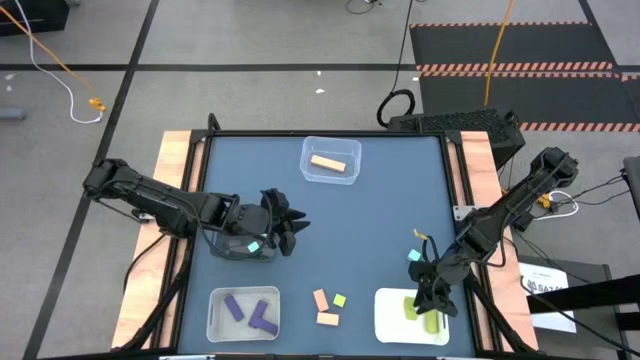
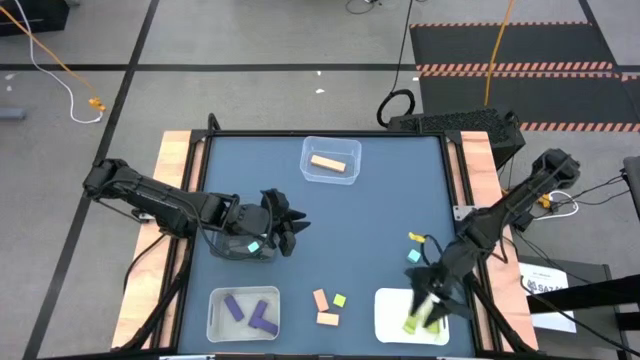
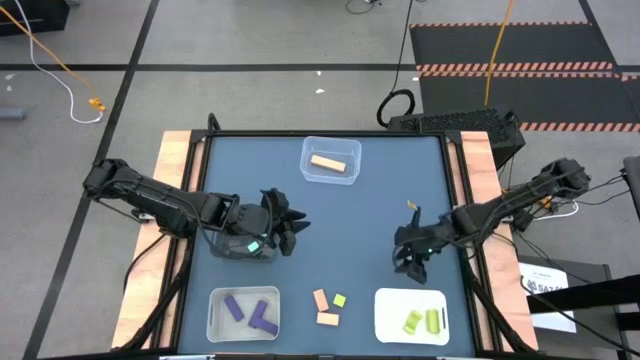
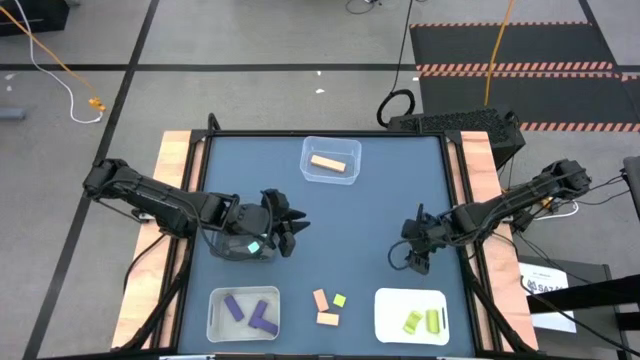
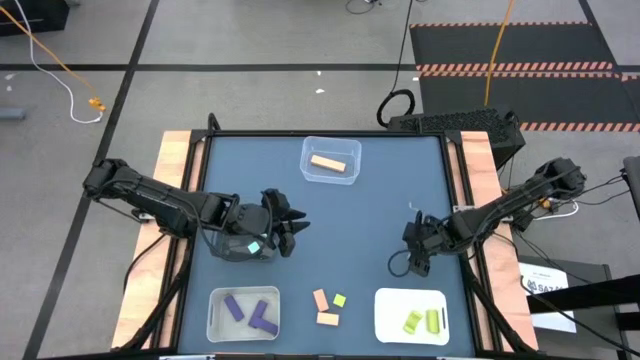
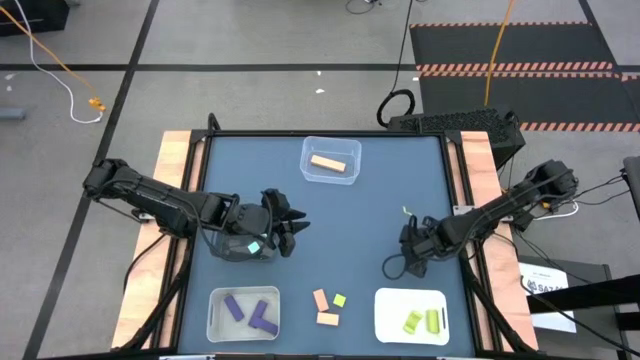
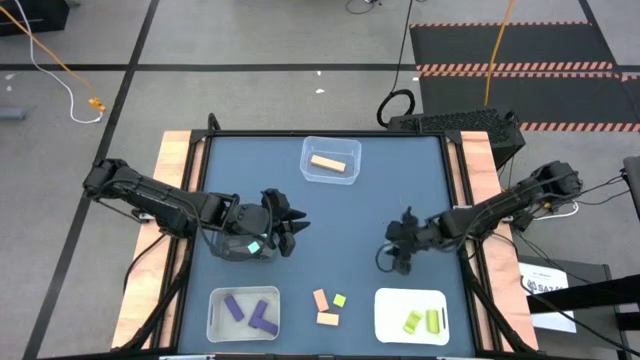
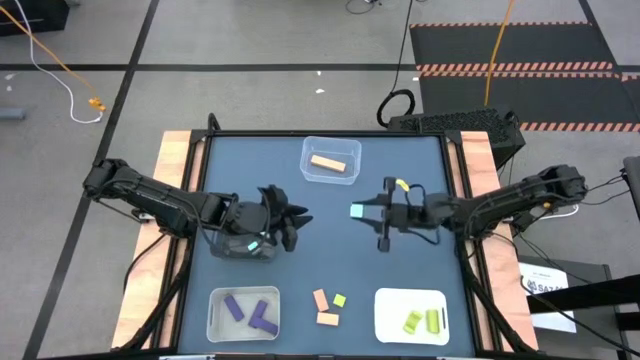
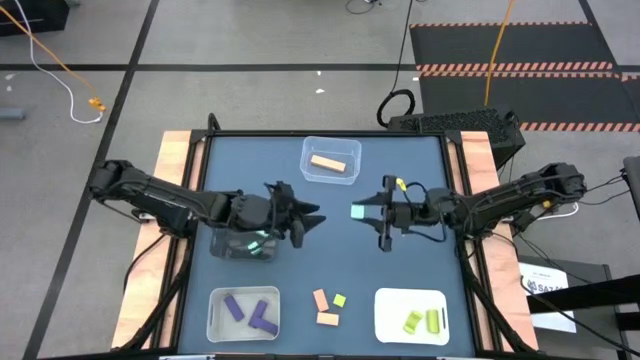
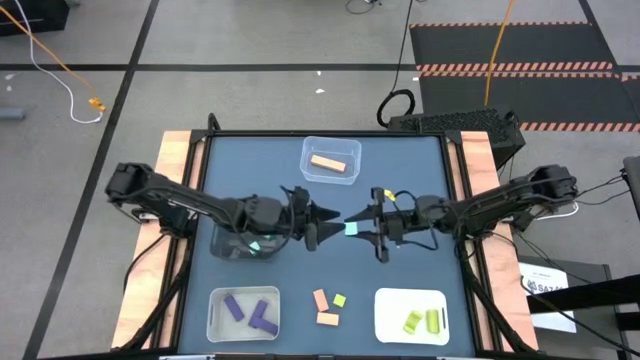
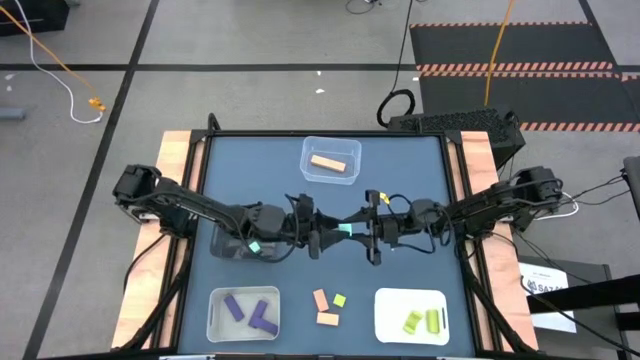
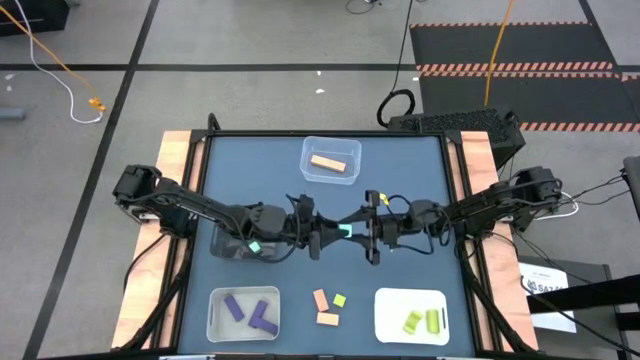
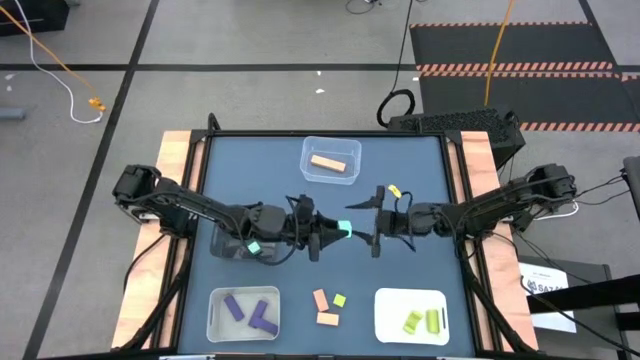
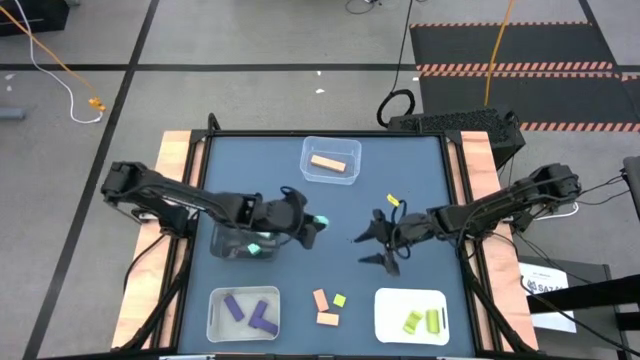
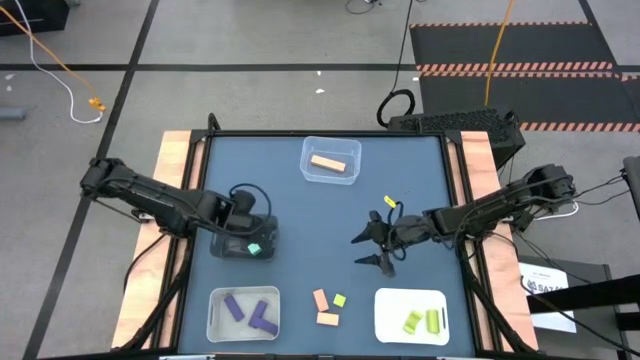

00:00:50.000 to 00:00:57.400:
Task: Sort & place blocks by color
Put the blue blocks into the black bin

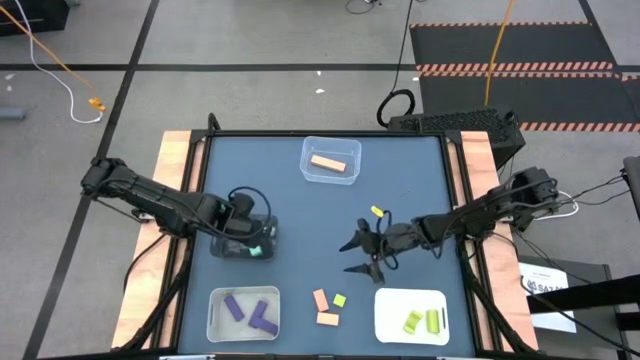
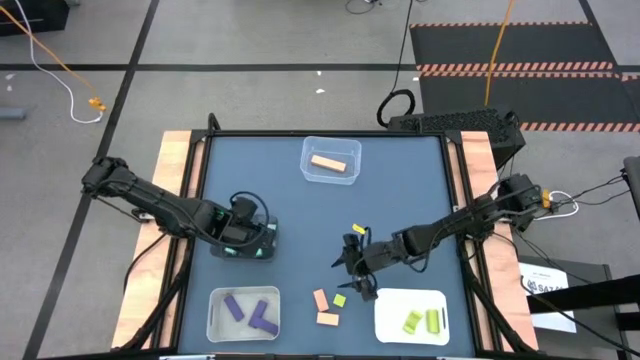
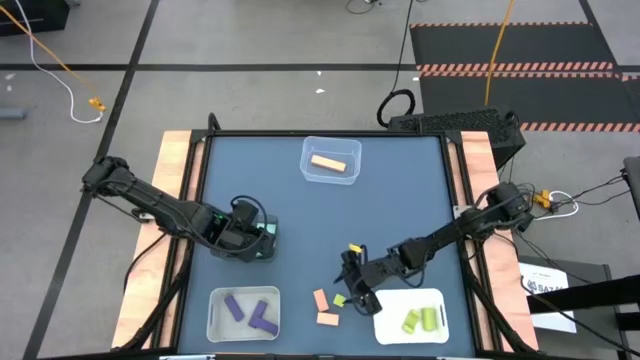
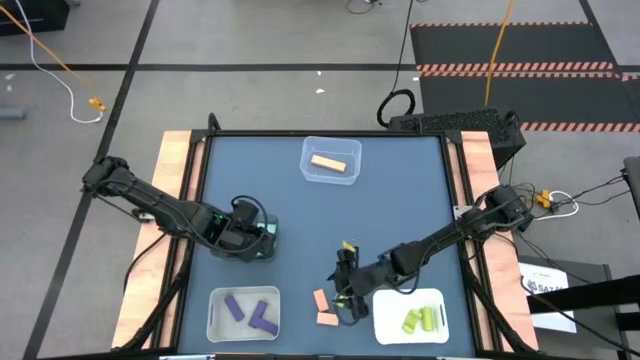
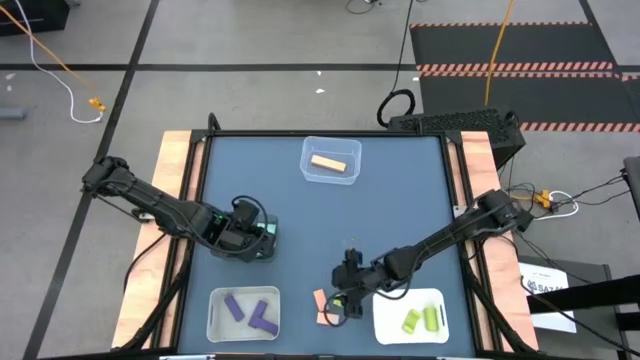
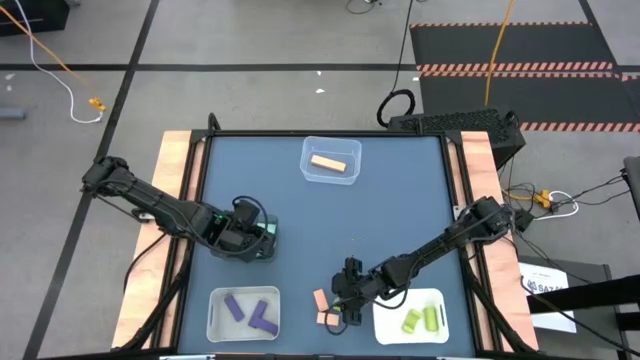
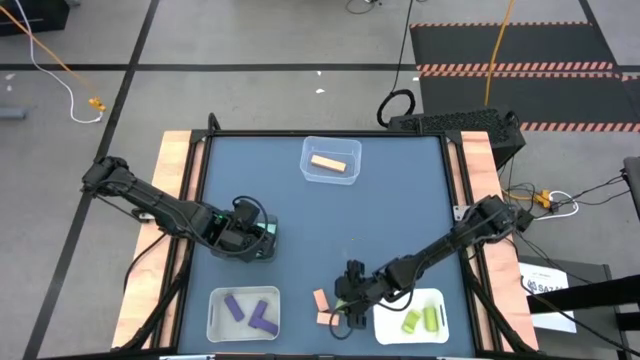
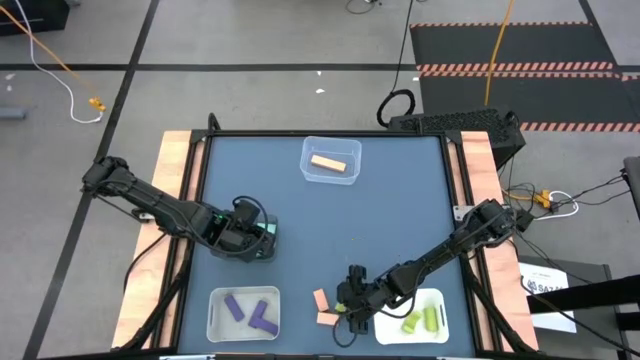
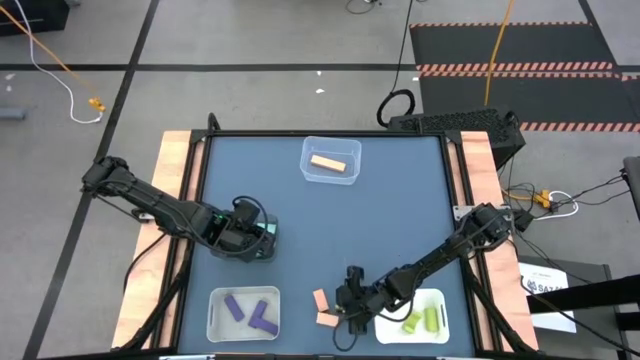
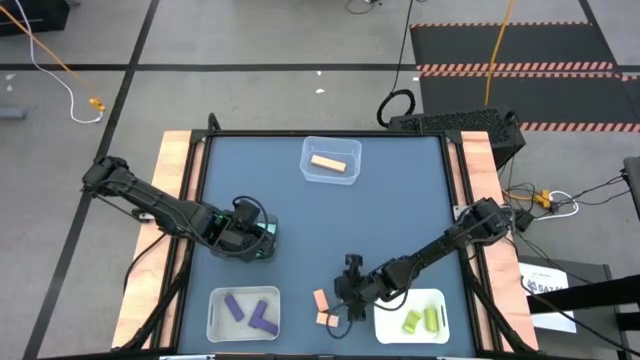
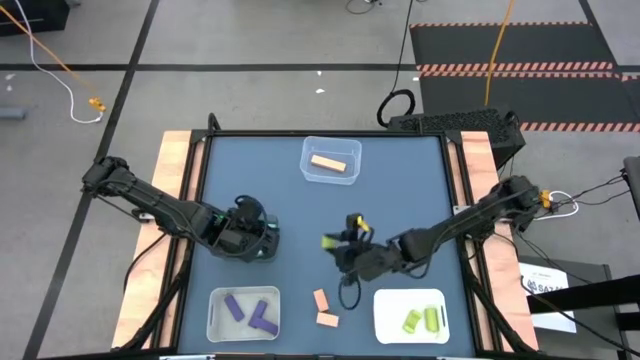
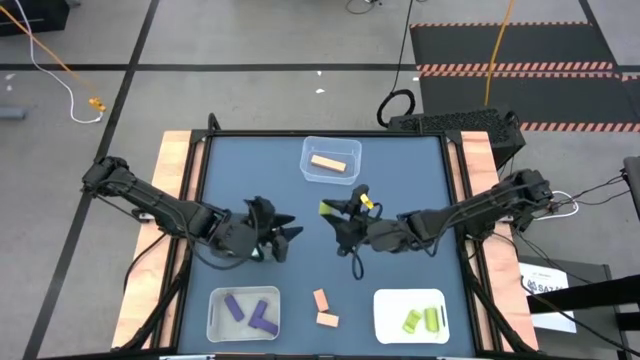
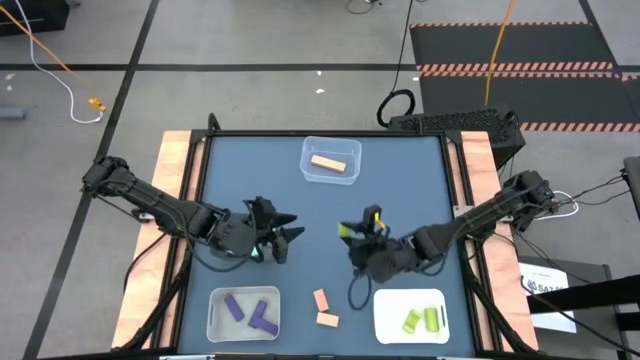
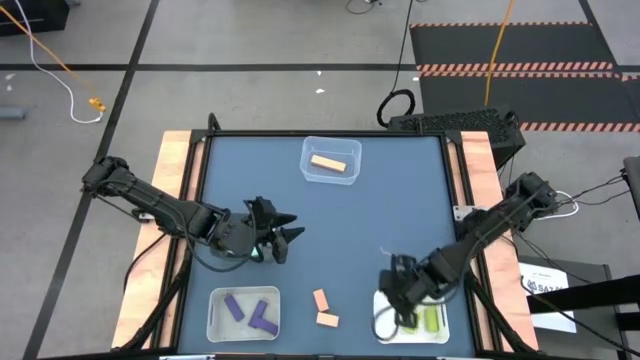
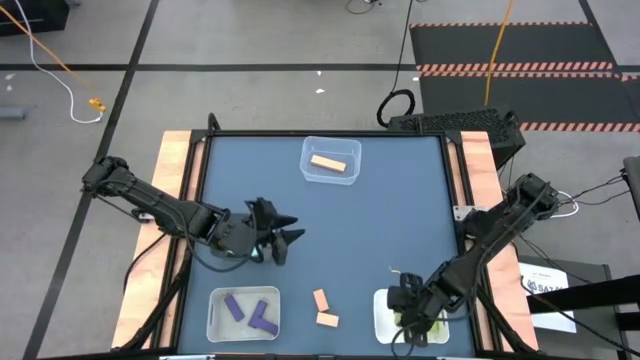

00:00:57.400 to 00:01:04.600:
Put the green blocks into the white bin

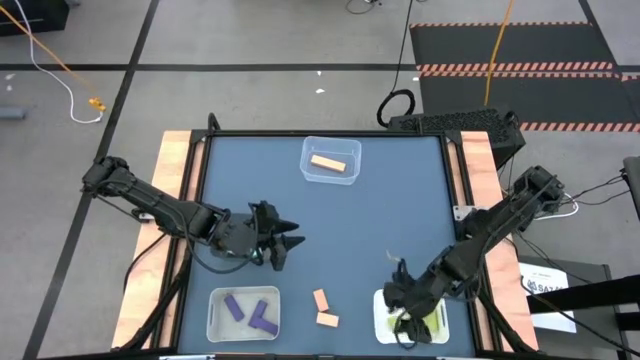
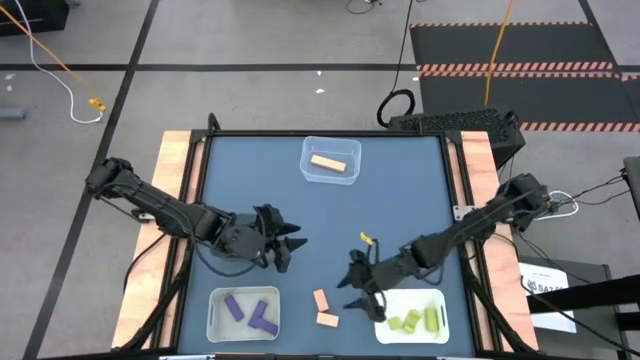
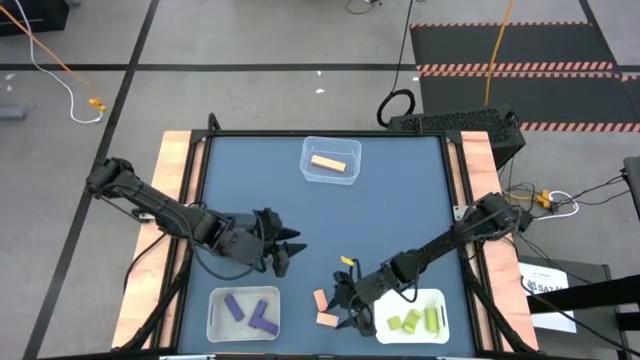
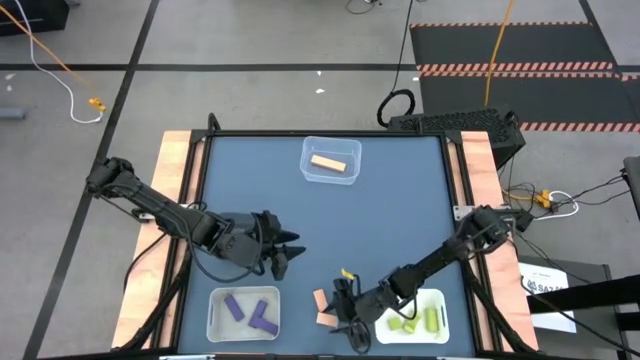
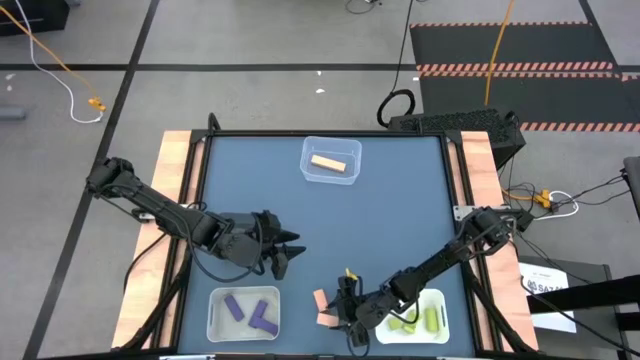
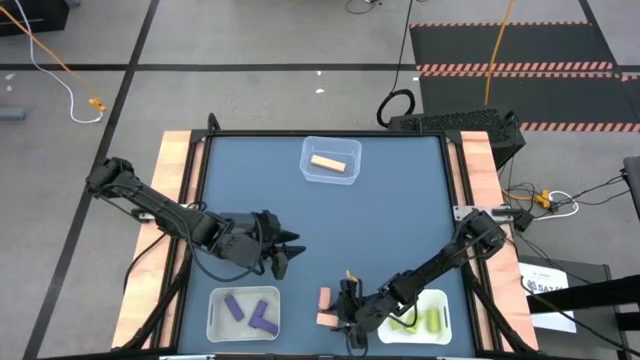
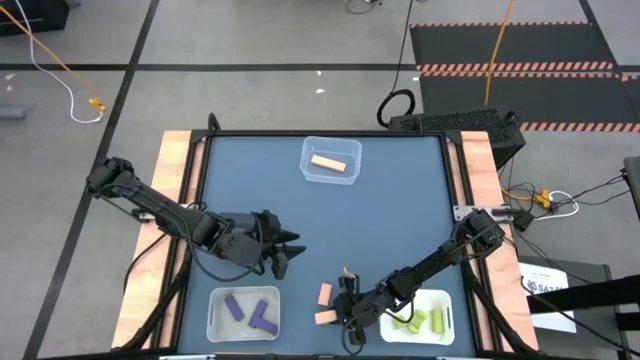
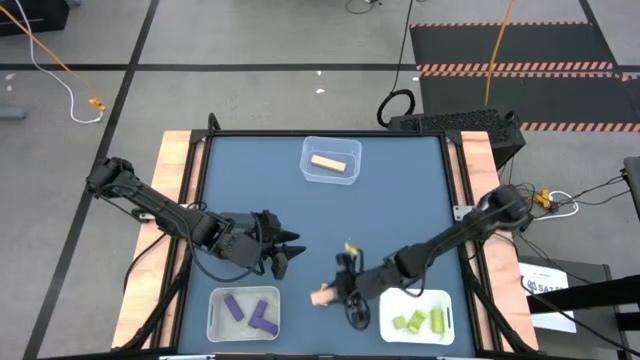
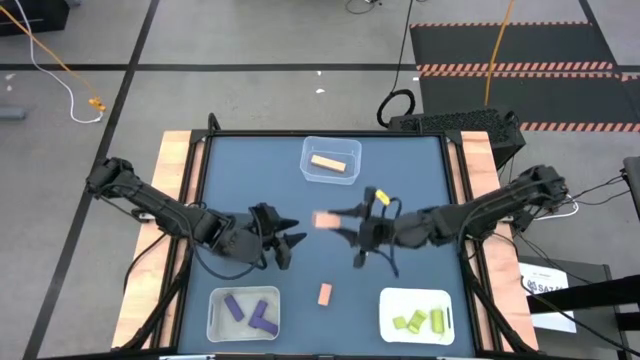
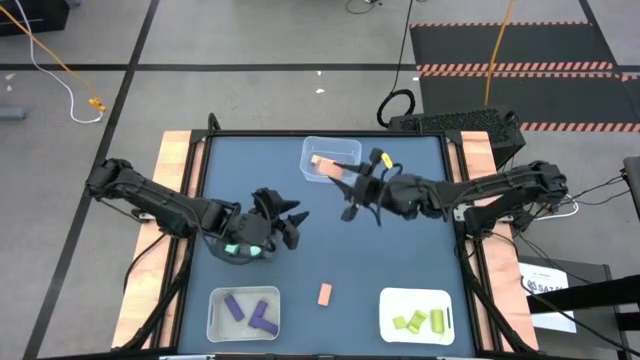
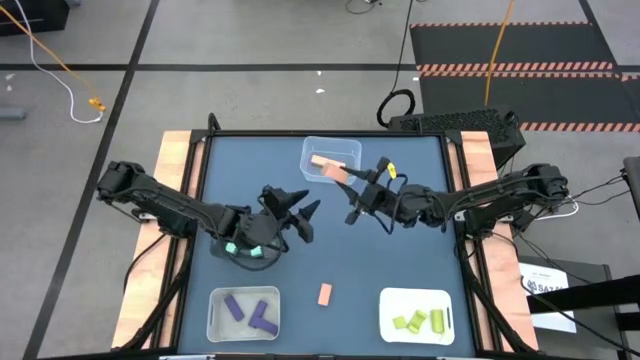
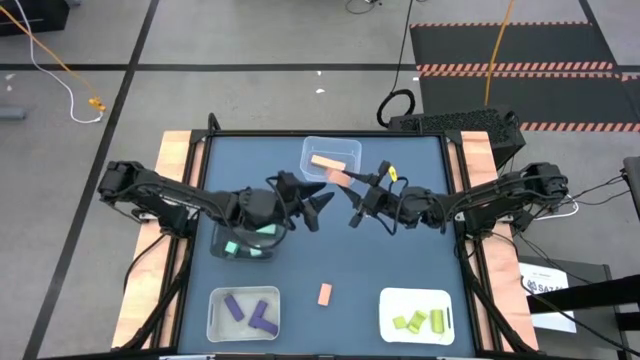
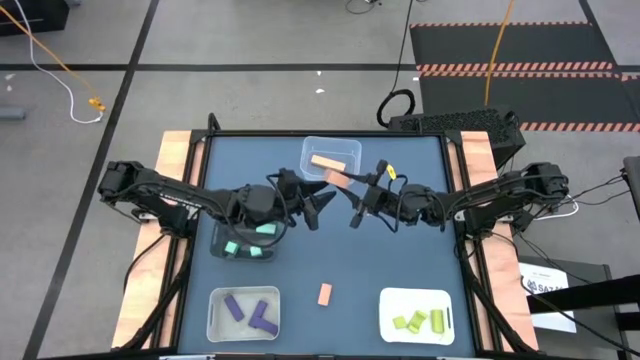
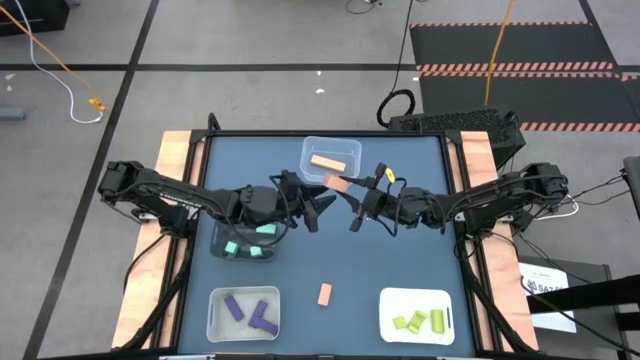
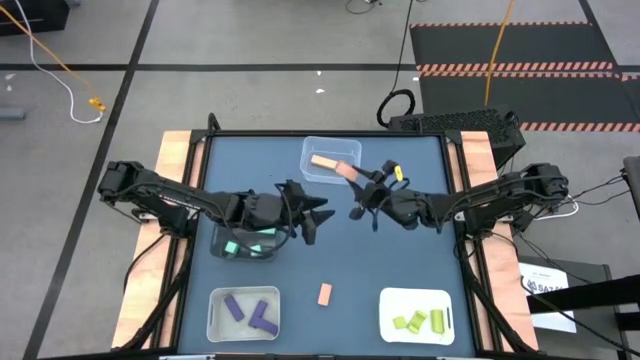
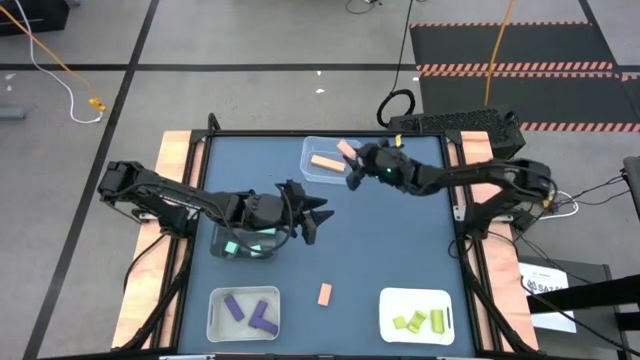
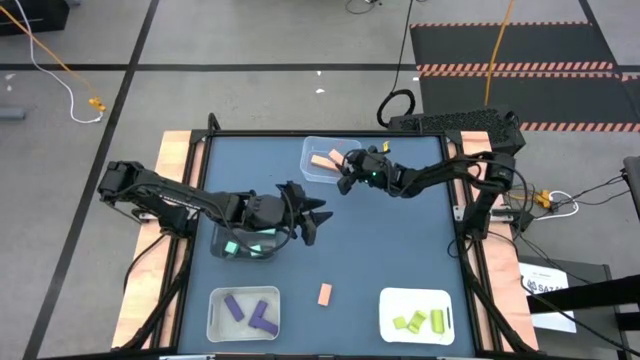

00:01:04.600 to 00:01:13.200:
Put the bottom orange blocks into the transparent bin
